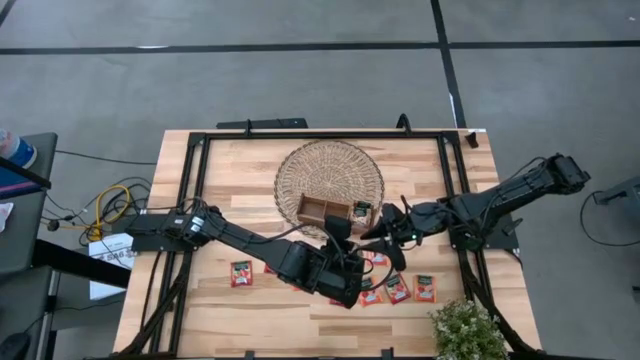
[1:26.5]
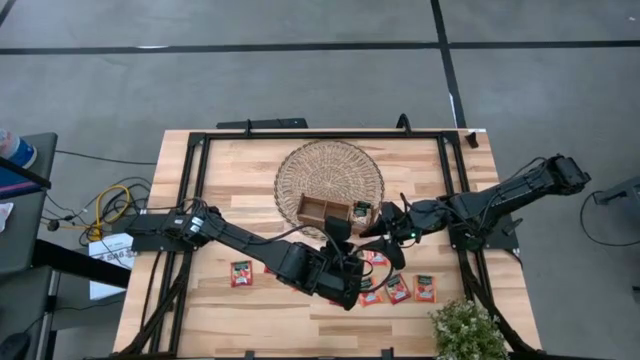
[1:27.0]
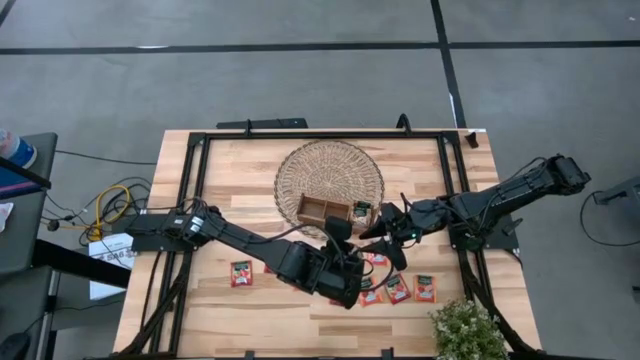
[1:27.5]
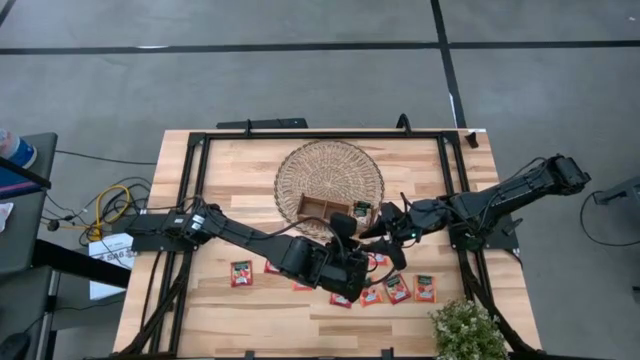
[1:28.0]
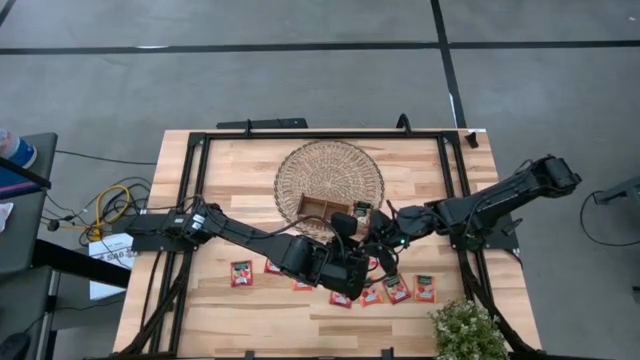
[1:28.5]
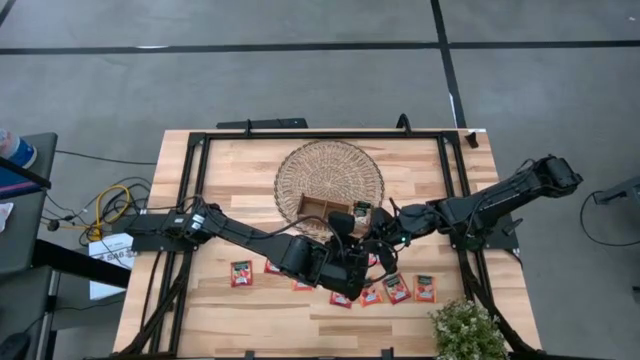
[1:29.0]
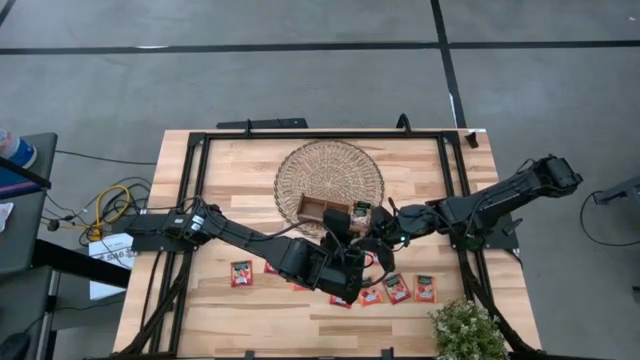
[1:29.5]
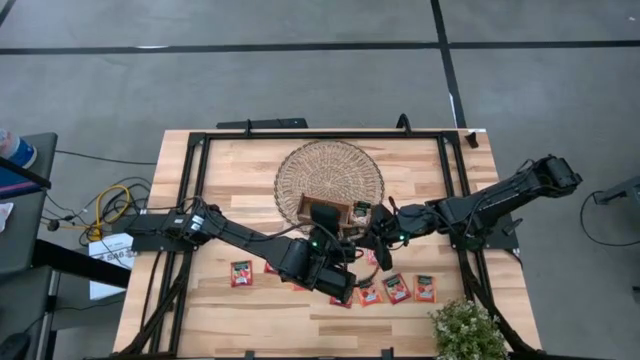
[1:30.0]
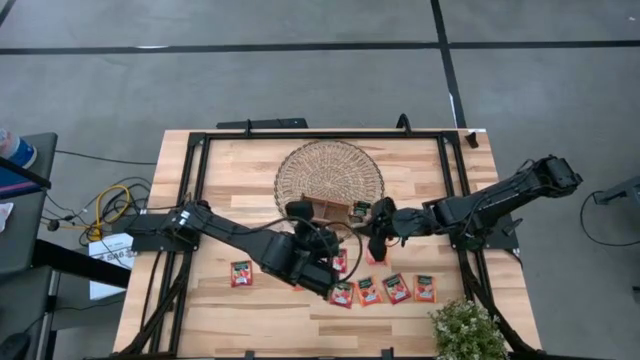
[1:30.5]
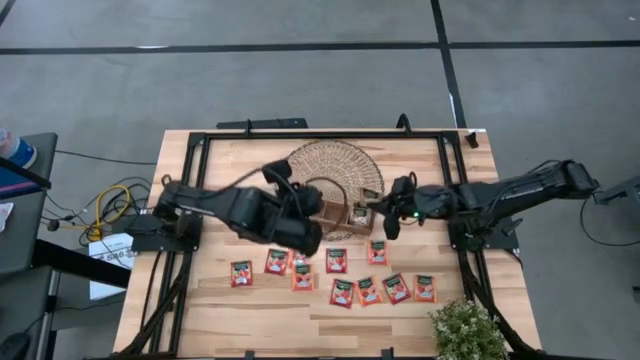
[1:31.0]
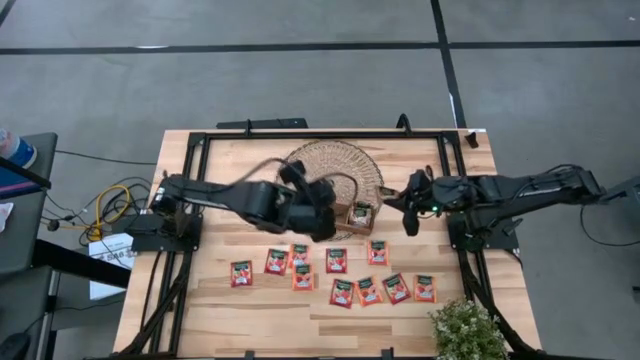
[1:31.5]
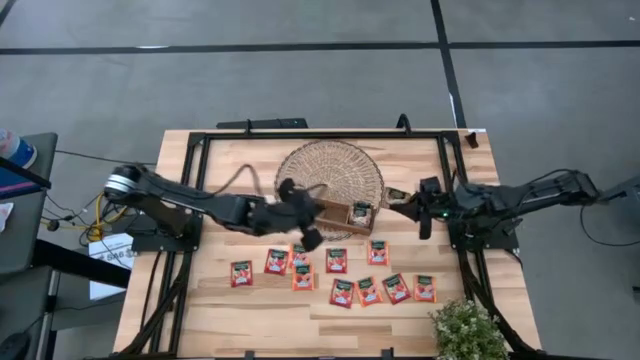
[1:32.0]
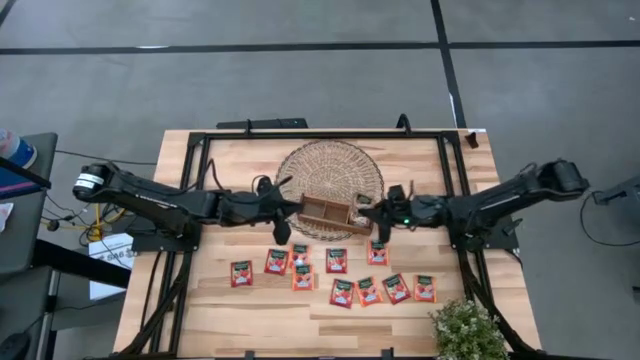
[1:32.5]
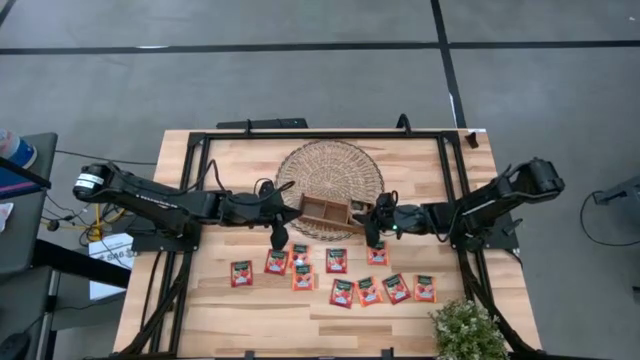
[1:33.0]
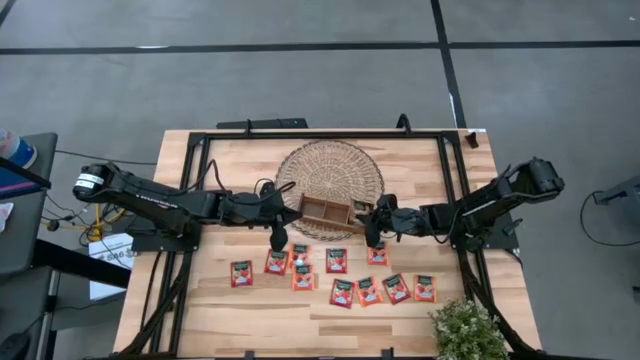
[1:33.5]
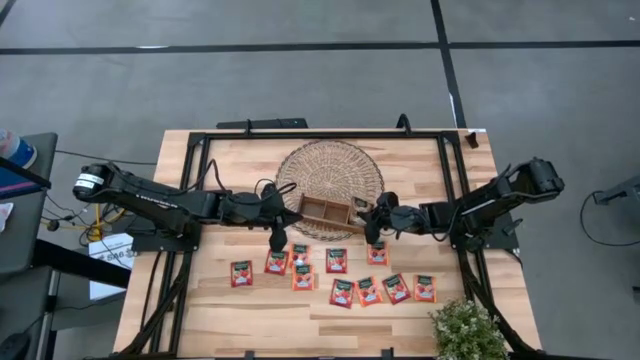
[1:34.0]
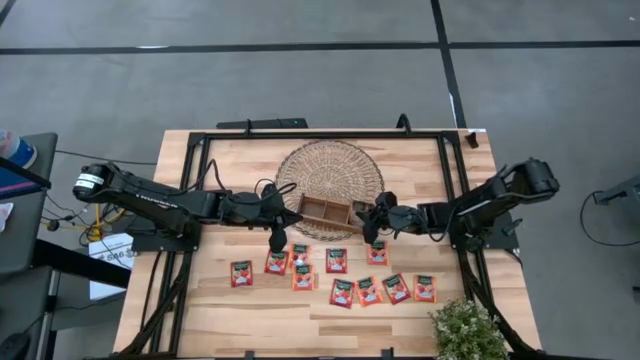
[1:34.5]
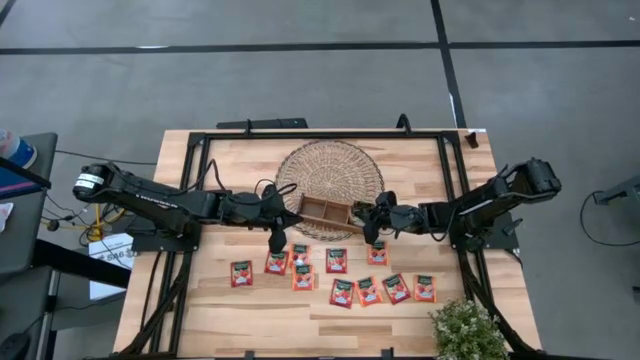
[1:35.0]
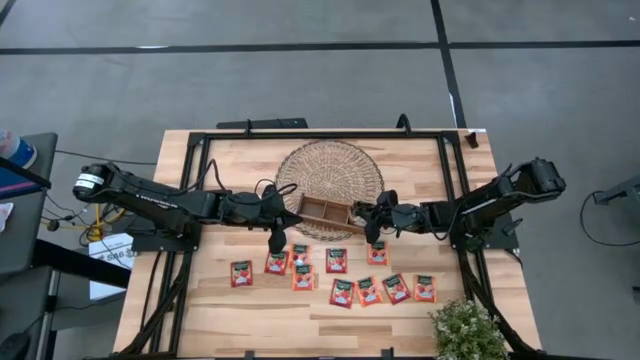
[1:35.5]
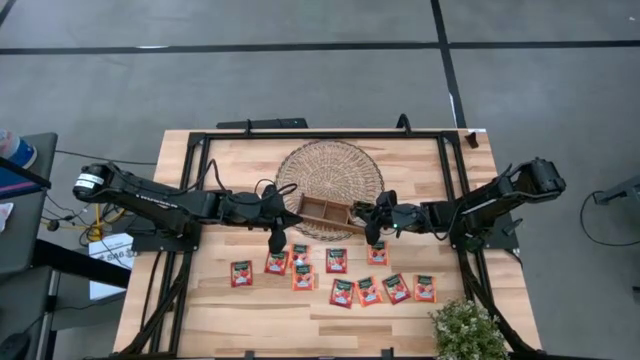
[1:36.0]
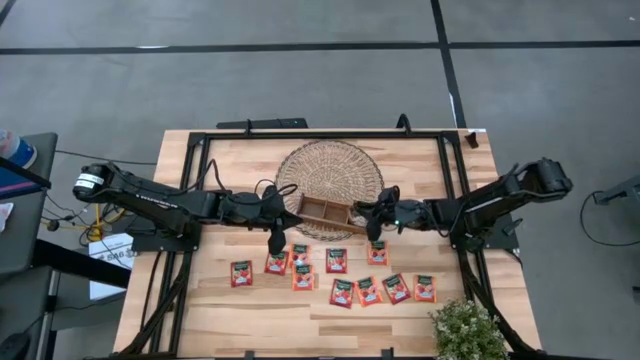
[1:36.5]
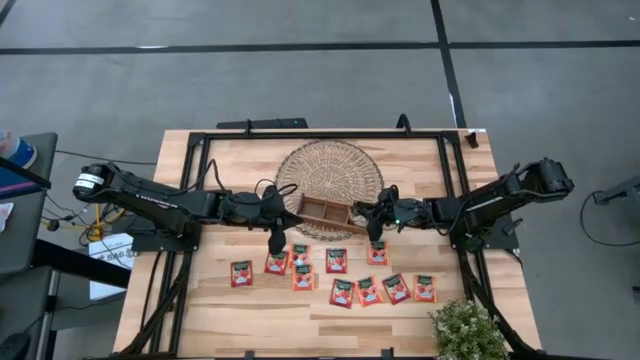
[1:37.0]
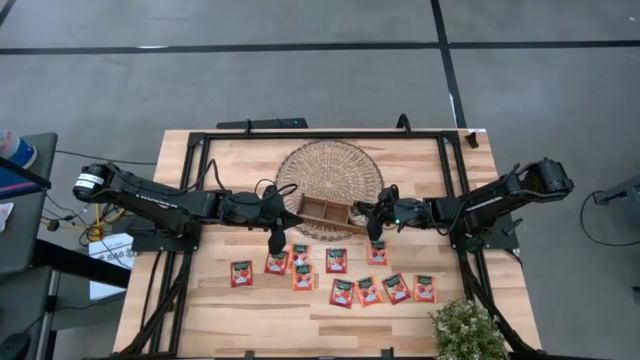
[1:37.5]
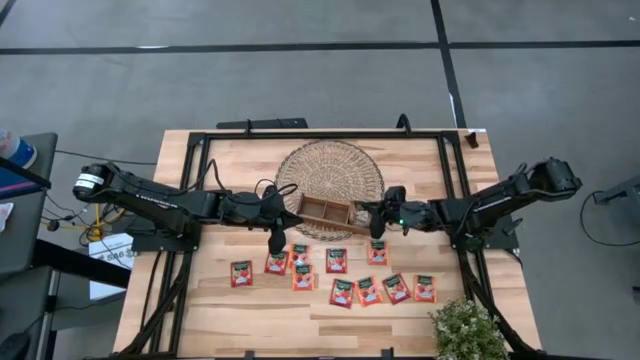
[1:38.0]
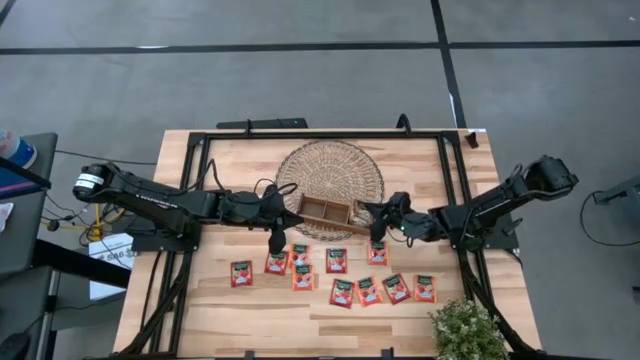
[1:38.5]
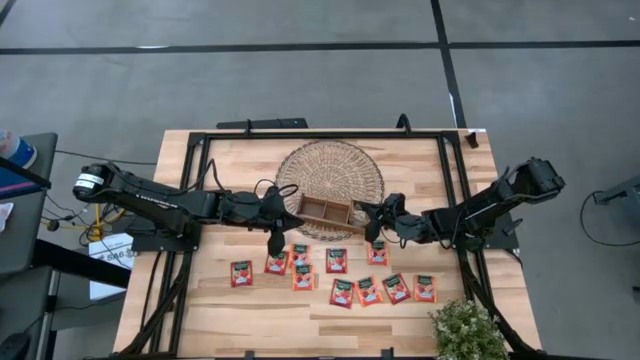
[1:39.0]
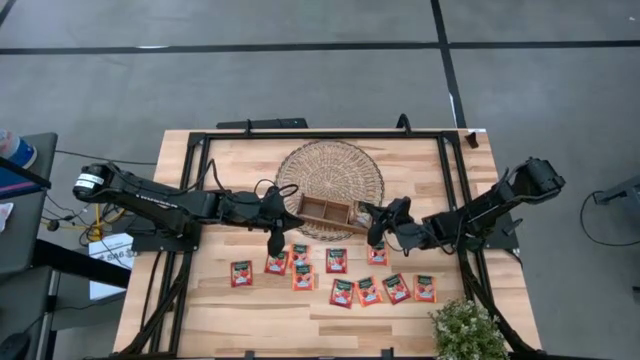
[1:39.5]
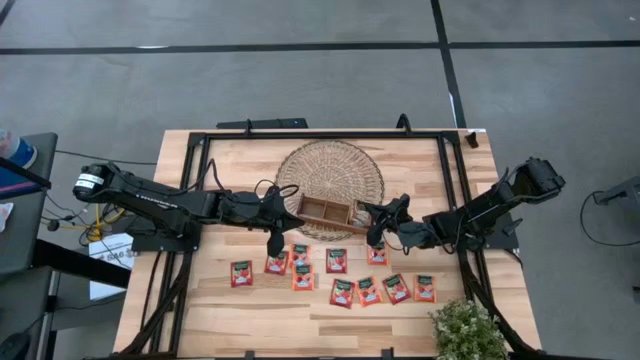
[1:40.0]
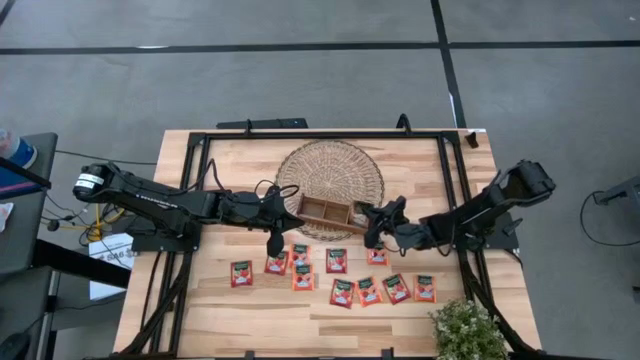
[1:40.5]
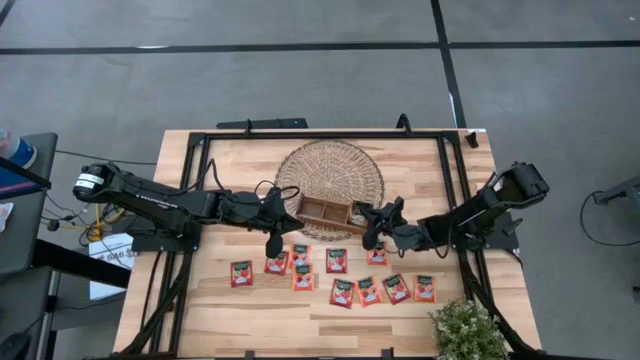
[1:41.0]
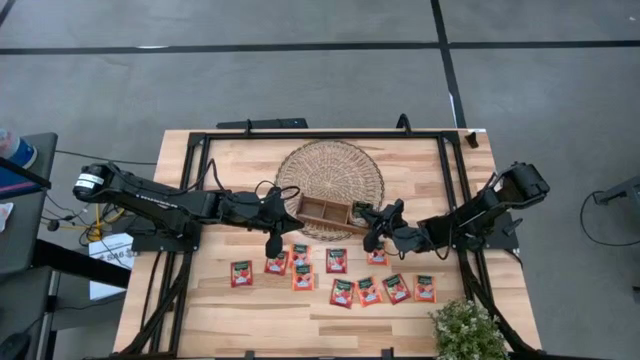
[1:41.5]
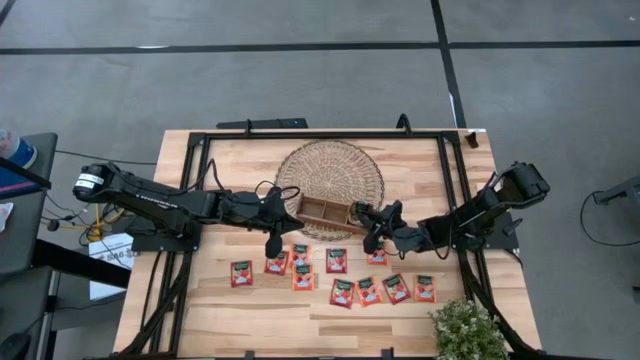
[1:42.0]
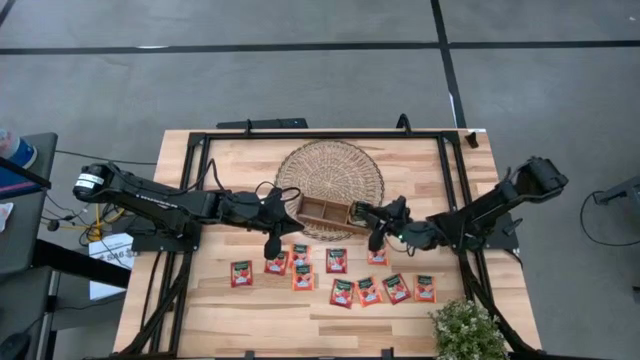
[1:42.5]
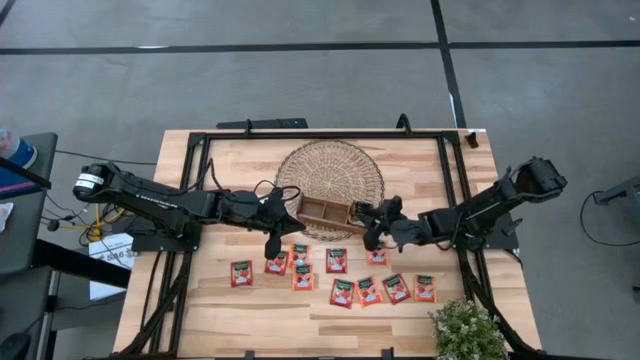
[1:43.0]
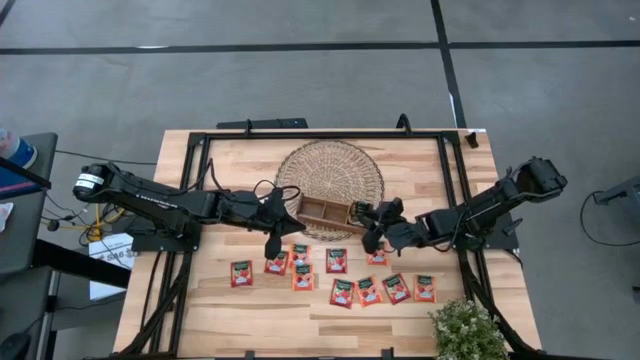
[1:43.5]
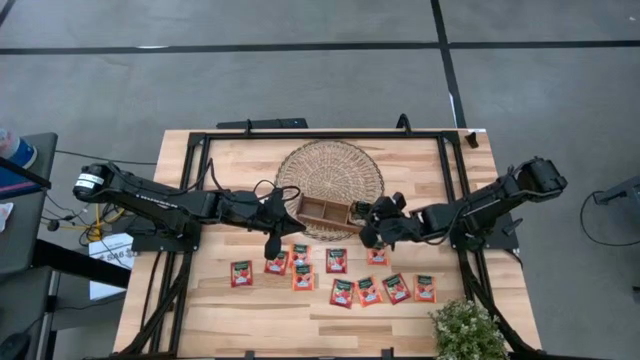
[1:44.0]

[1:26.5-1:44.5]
Task: Pick & Place Tea
Put the brown tea bag into the right section of the wooden organizer

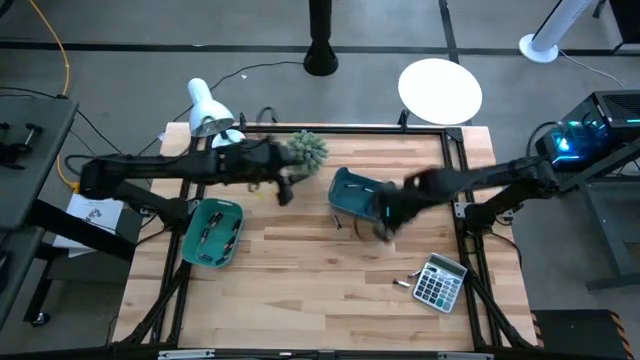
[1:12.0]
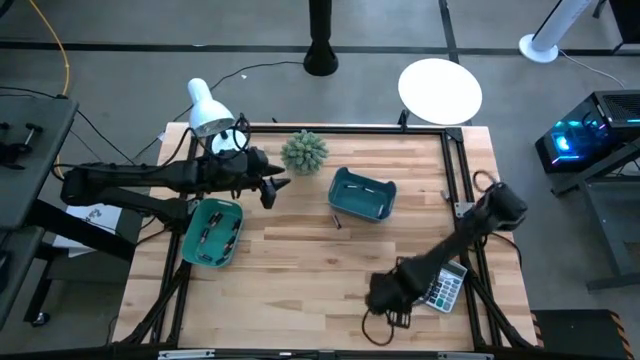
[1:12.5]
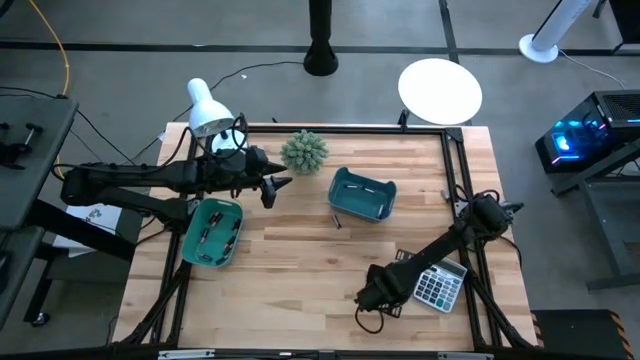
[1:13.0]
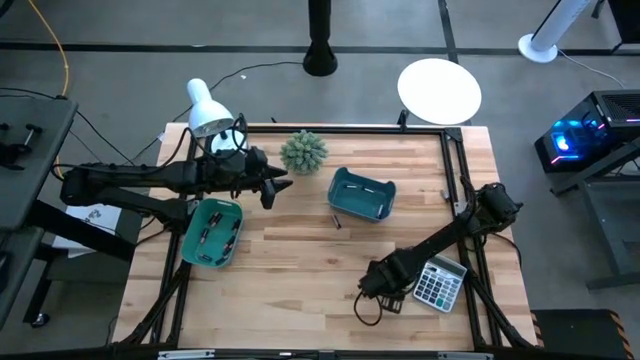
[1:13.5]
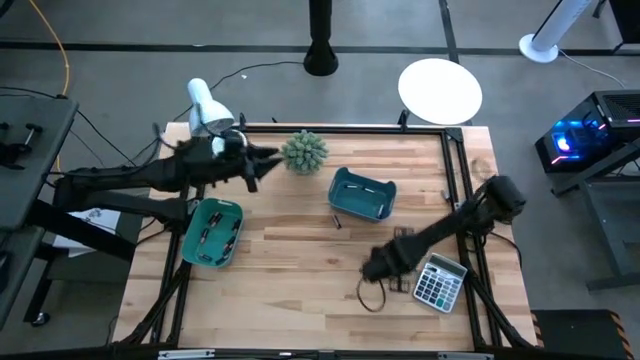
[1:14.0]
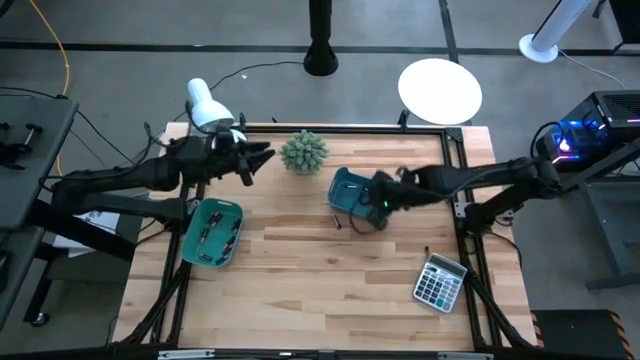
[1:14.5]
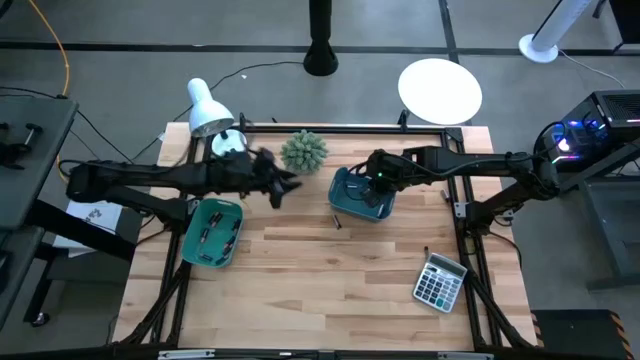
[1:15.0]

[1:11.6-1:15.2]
Task: Sort batteries
Put the silver battery into the blue bin

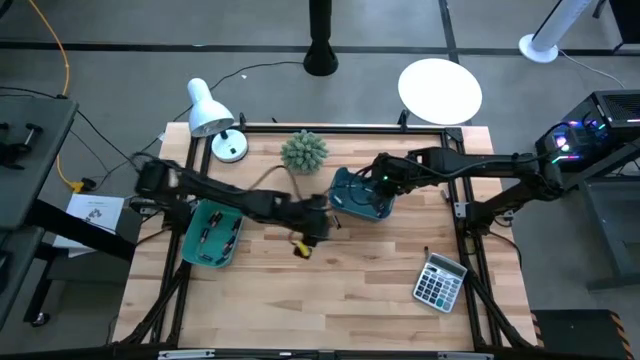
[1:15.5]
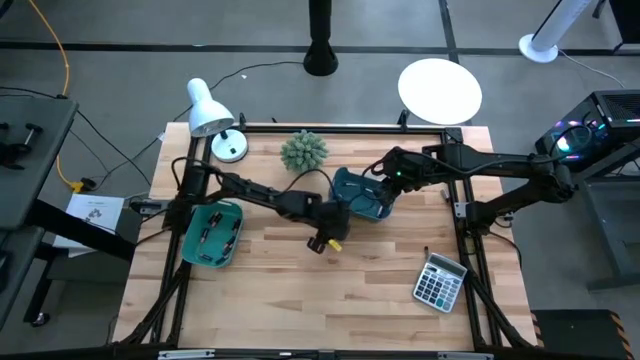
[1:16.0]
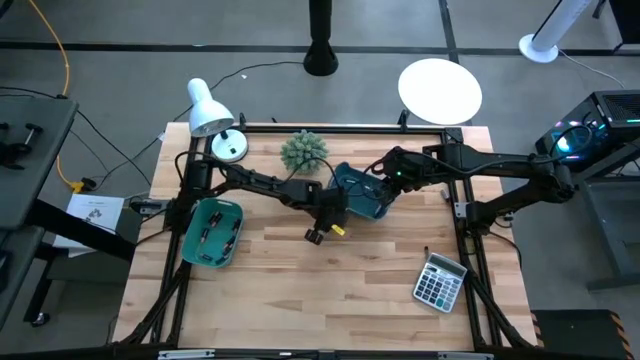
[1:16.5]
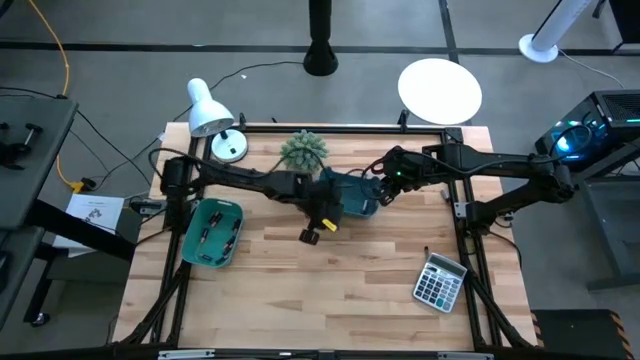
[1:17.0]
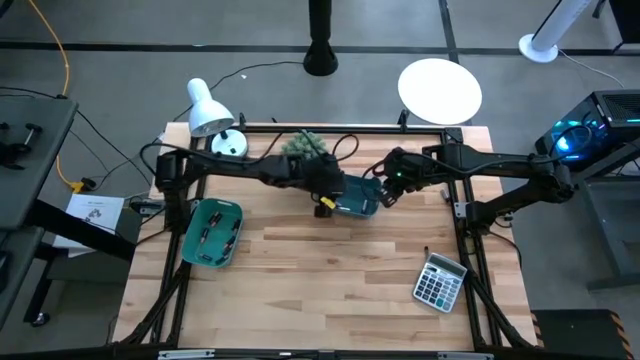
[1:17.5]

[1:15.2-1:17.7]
Put the silver battery into the blue bin
